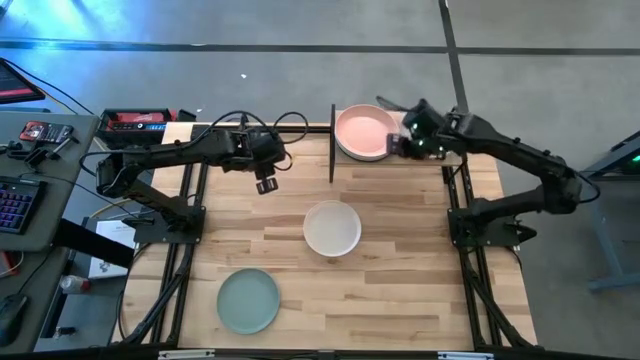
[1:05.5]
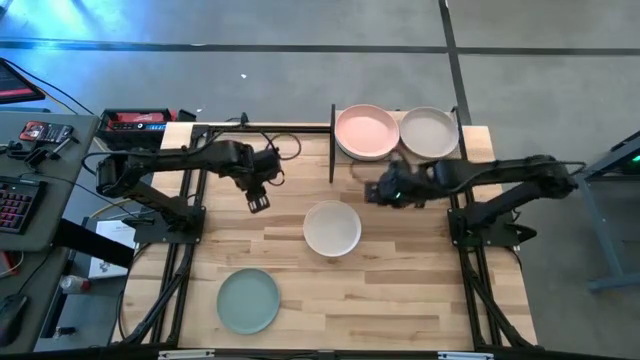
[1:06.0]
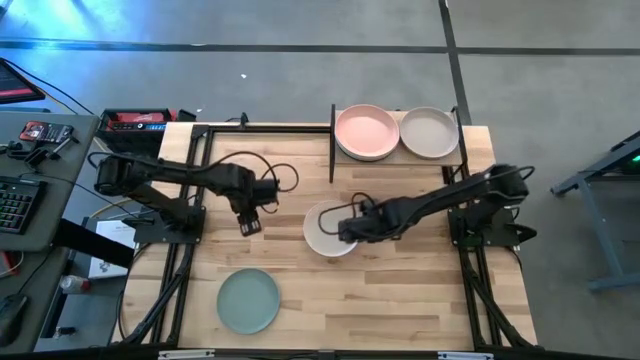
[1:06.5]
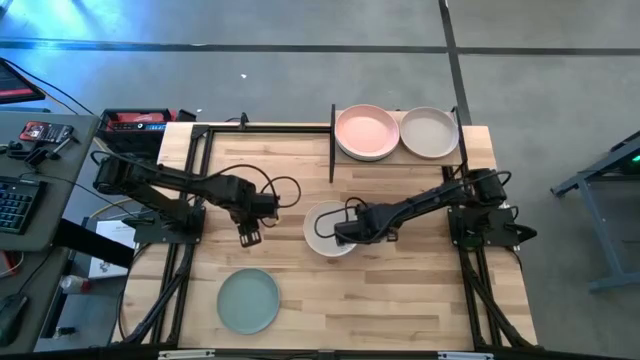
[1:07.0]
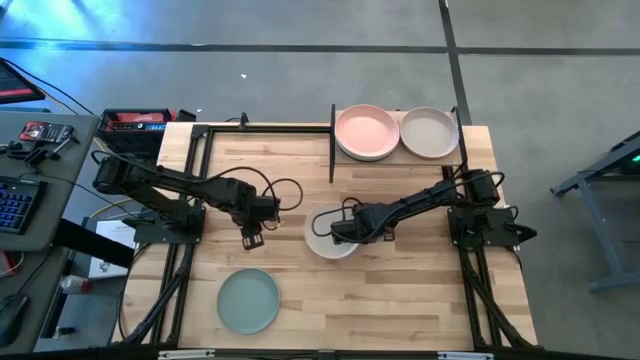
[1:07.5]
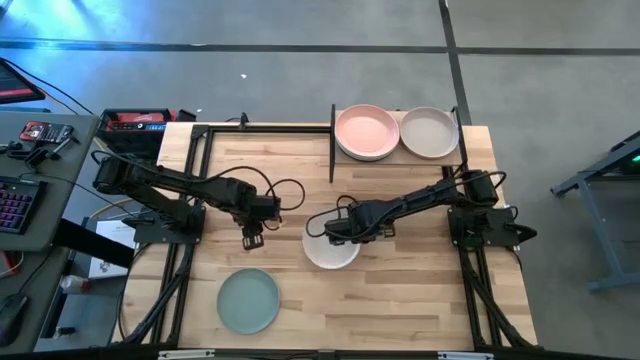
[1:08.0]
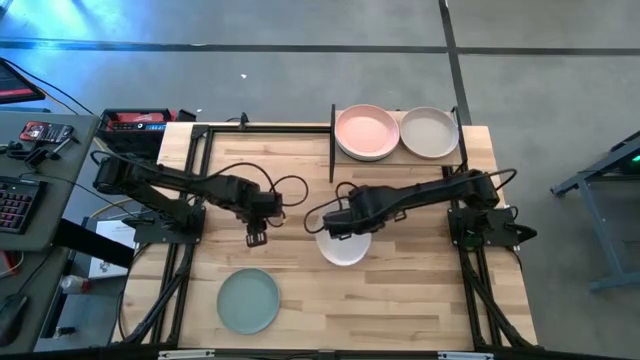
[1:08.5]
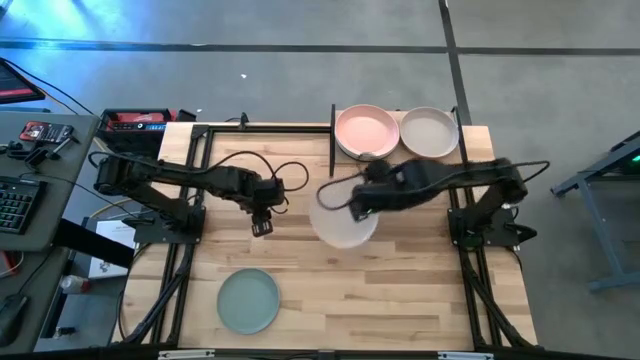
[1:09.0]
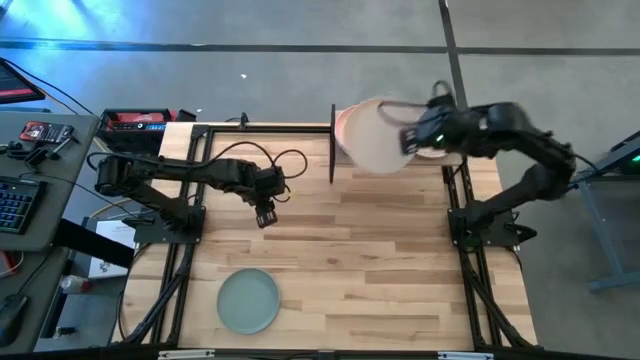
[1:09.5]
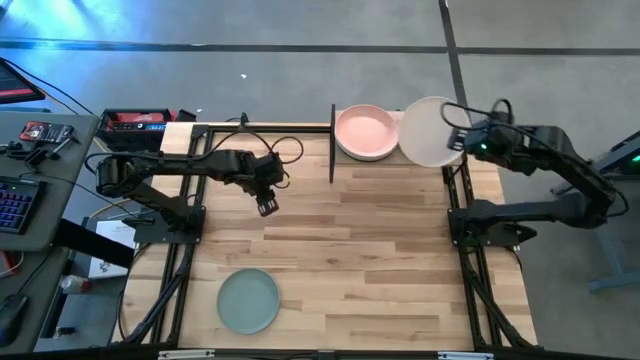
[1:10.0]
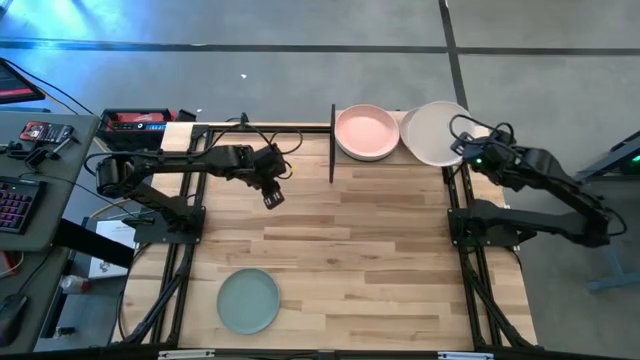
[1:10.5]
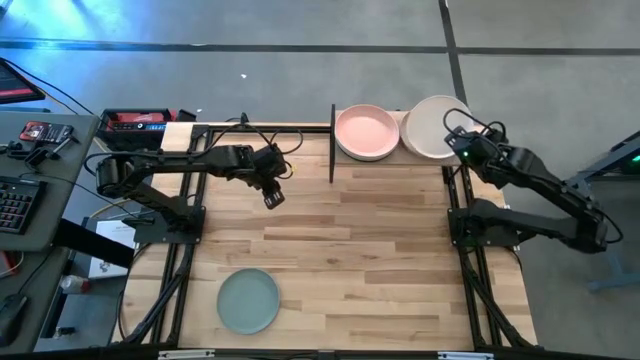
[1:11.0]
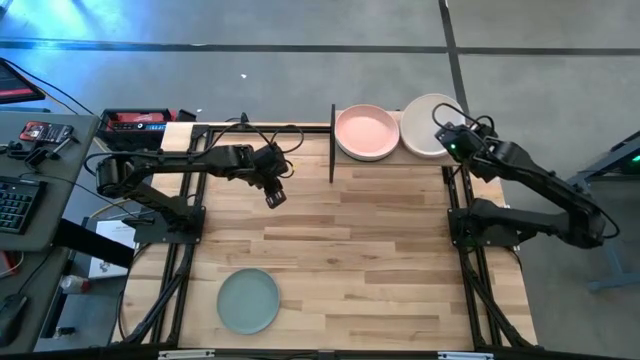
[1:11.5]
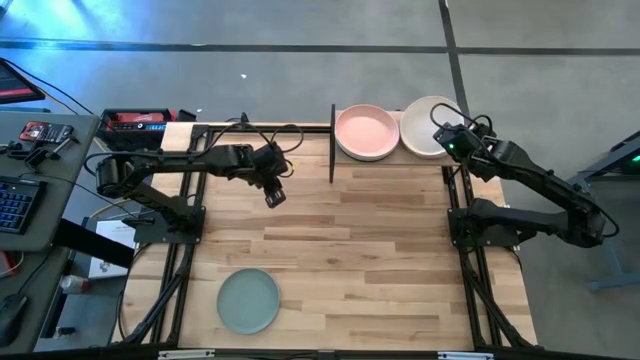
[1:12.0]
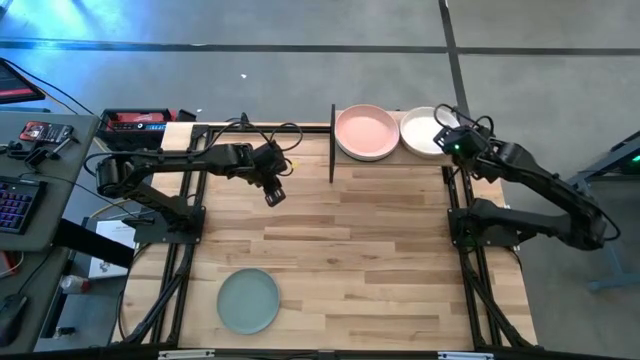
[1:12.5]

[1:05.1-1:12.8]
Task: Place and stack plates onto a shelf
Stack the white plate on top of the gray plate on the shelf

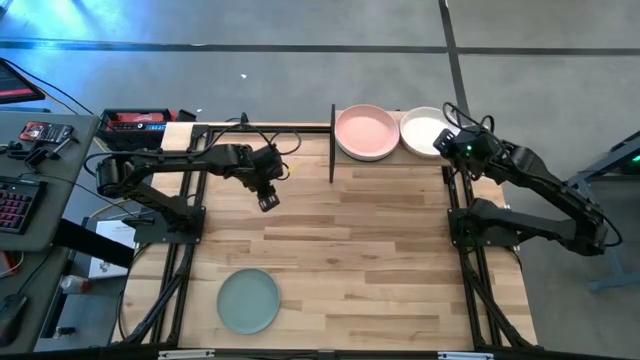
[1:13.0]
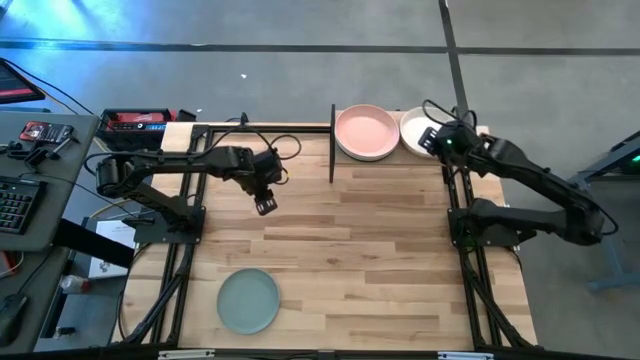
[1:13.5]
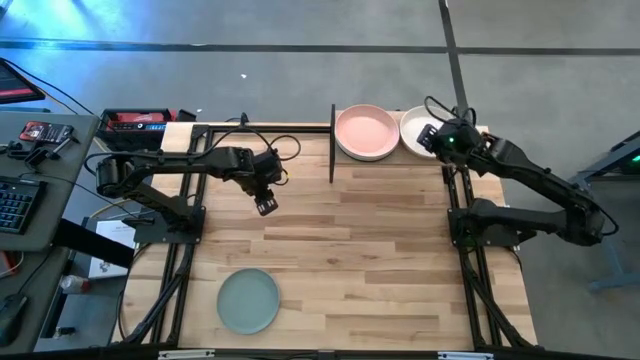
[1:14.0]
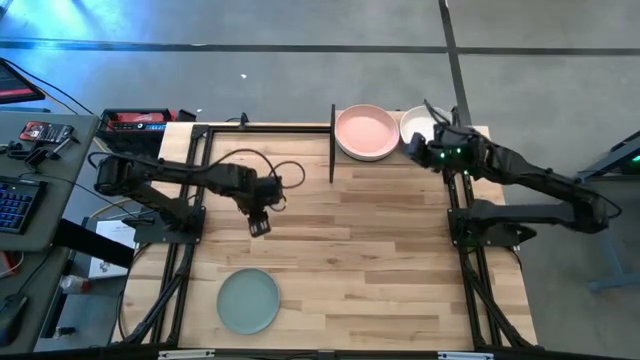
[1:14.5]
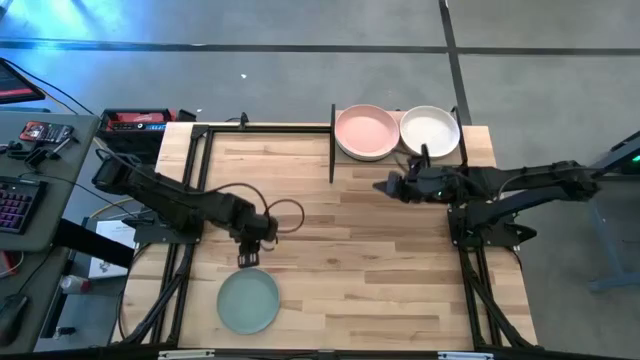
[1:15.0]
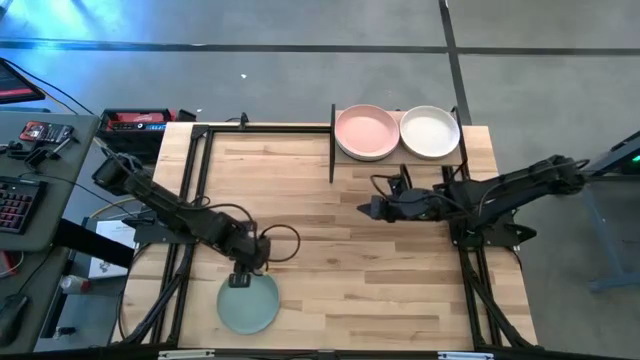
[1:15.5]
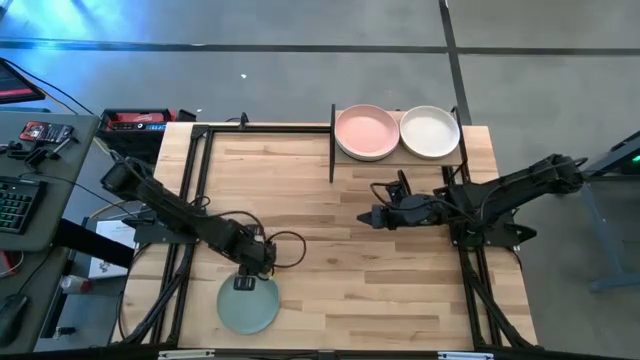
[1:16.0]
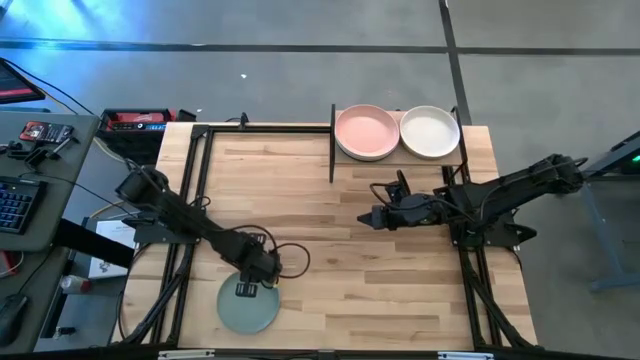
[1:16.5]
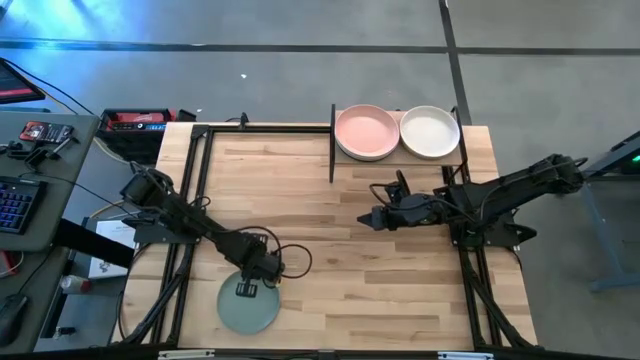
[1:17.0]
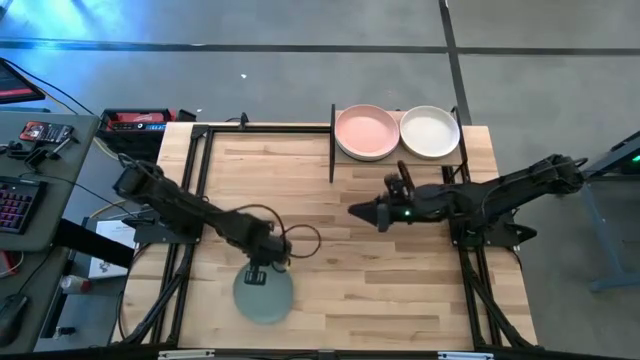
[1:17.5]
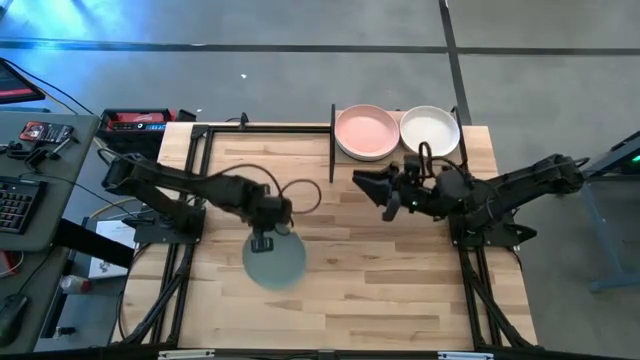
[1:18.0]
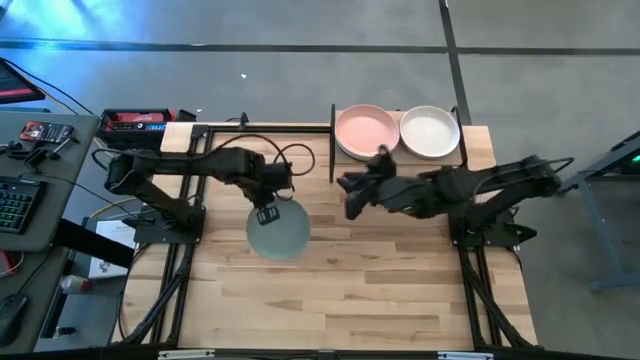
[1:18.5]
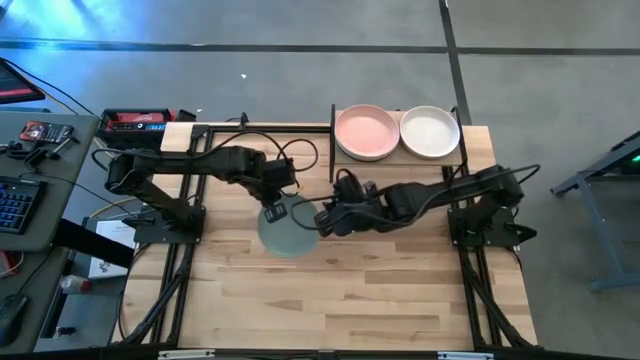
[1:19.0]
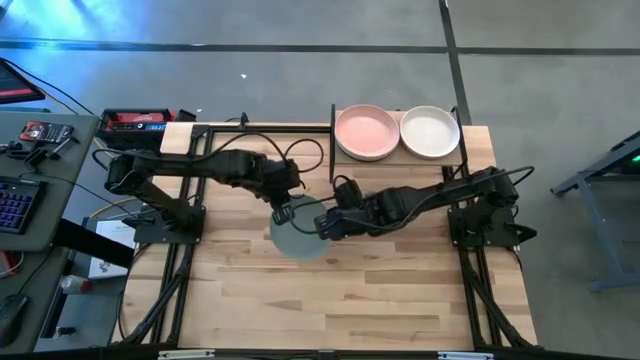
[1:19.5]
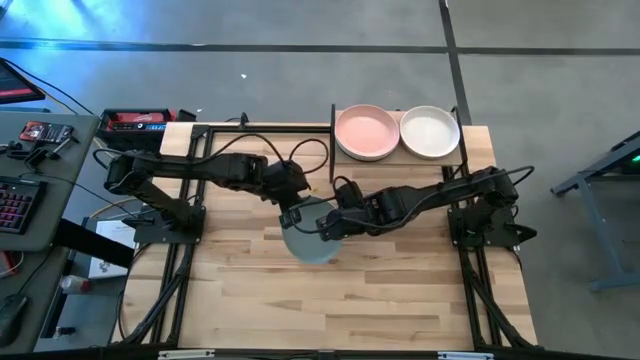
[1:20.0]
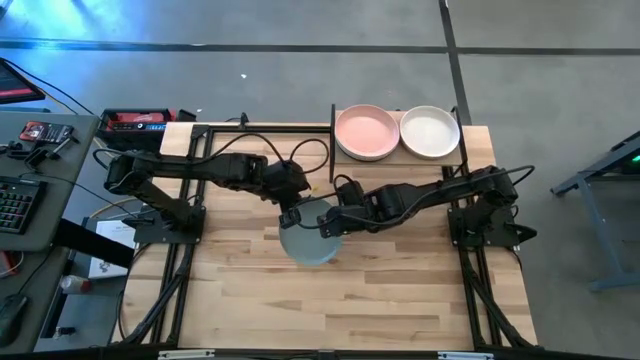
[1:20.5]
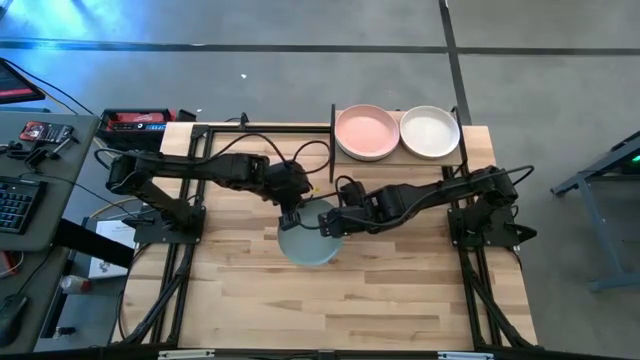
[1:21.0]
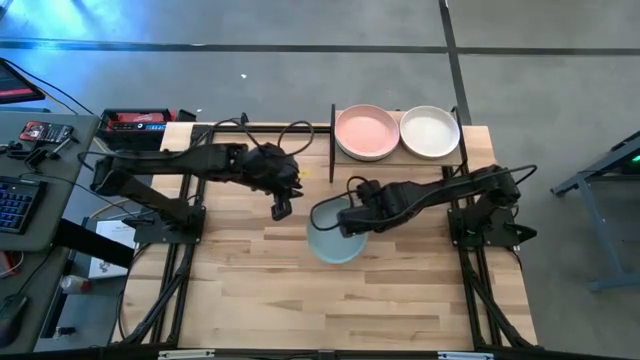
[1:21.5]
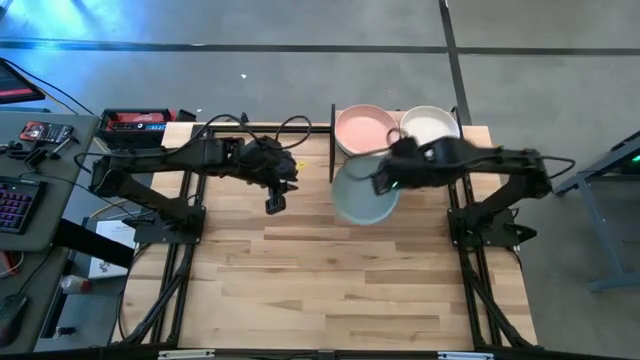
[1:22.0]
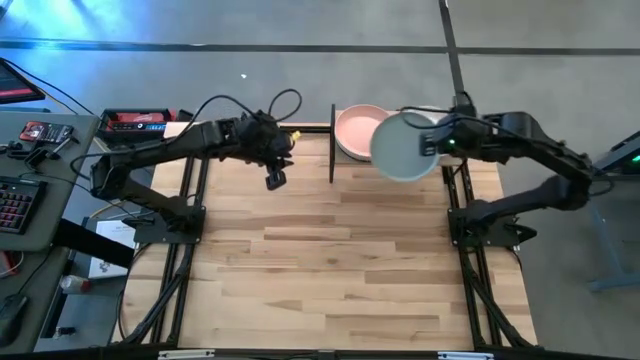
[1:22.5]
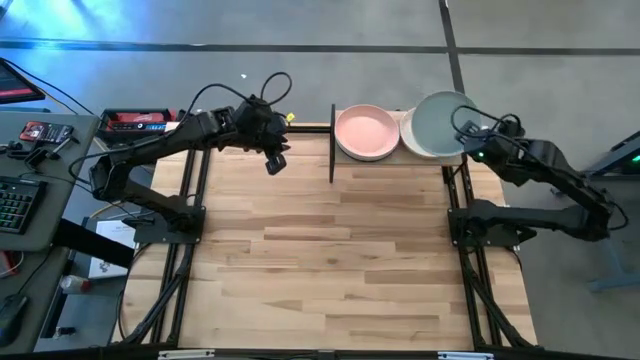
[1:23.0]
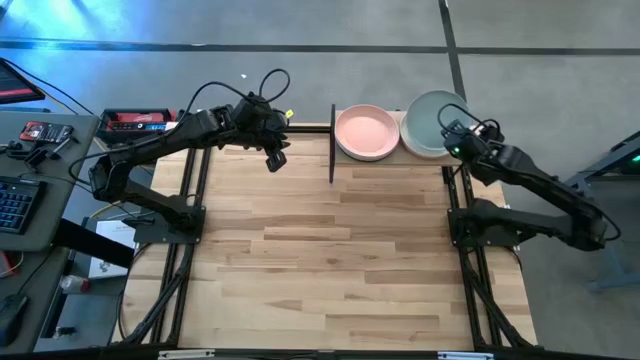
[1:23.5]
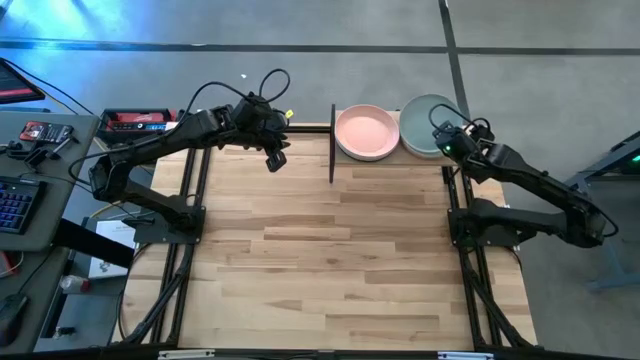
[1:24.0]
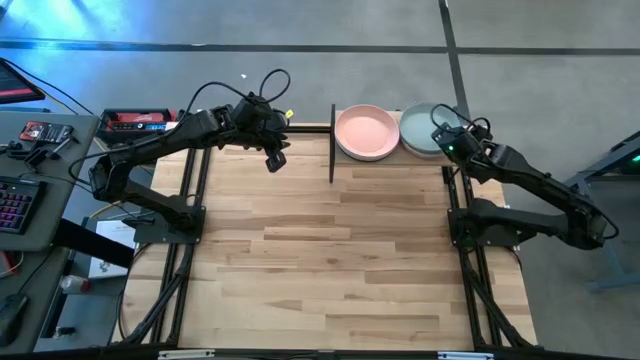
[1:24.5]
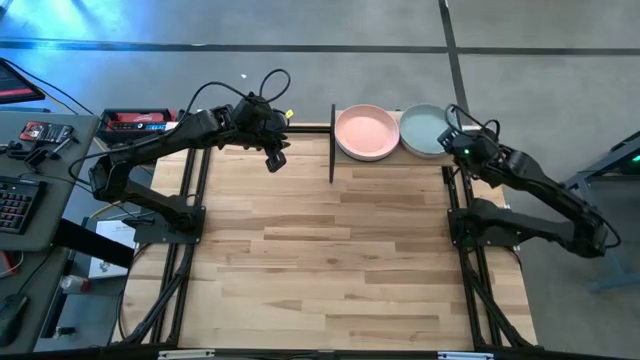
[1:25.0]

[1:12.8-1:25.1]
Stack the light blue plate on top of the white plate on the shelf

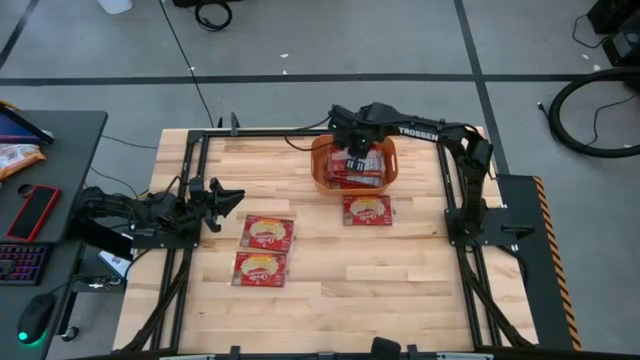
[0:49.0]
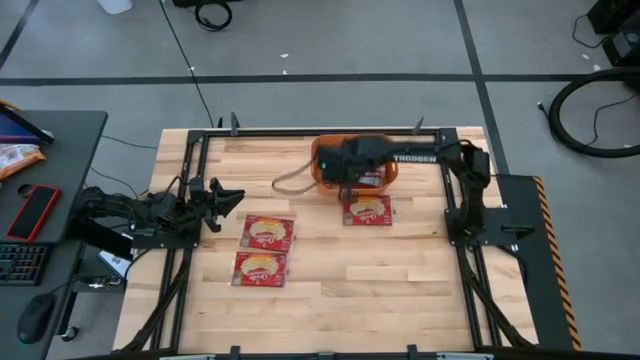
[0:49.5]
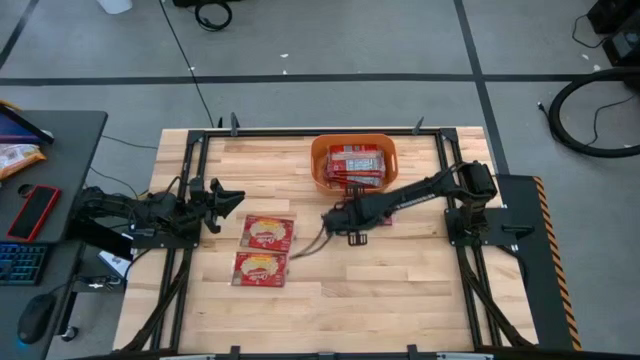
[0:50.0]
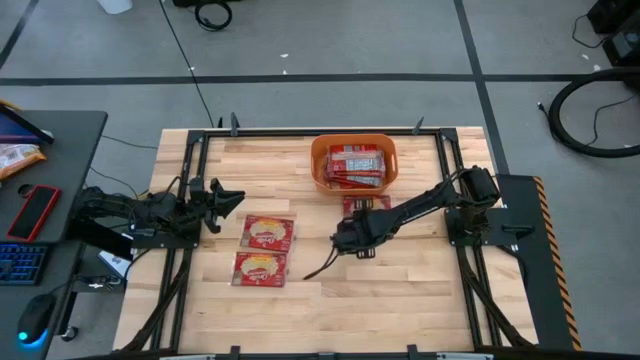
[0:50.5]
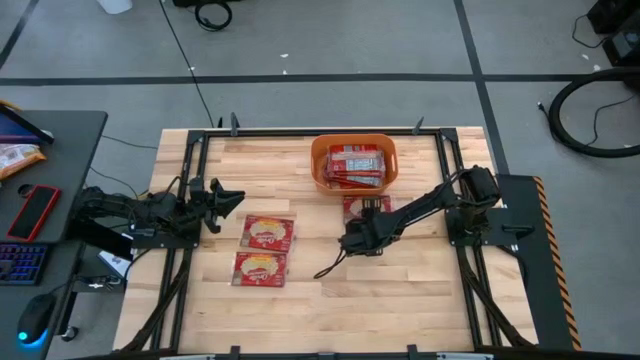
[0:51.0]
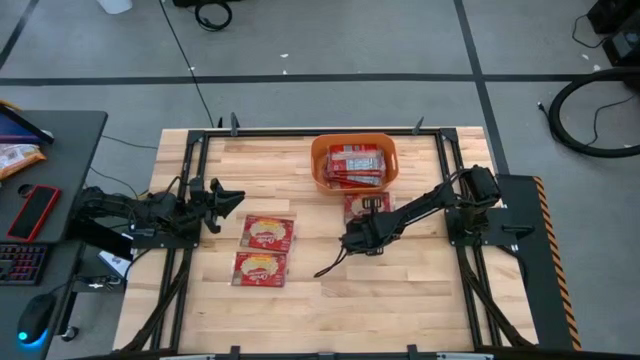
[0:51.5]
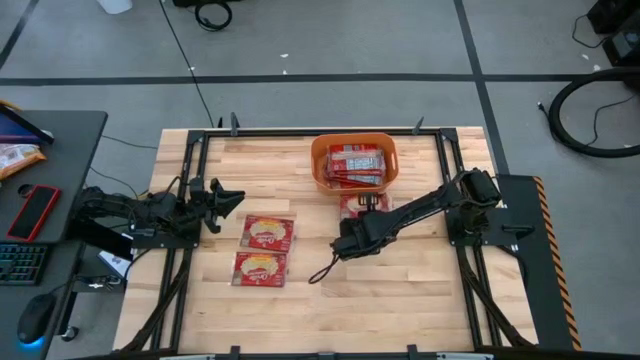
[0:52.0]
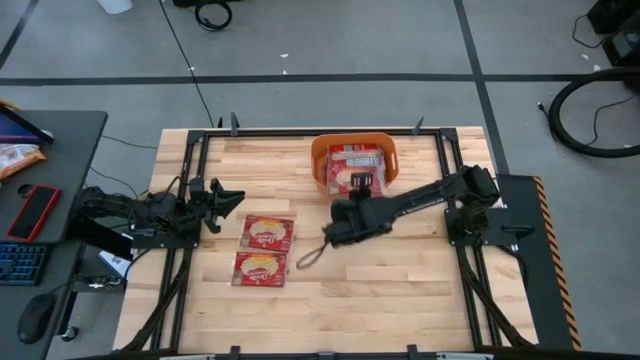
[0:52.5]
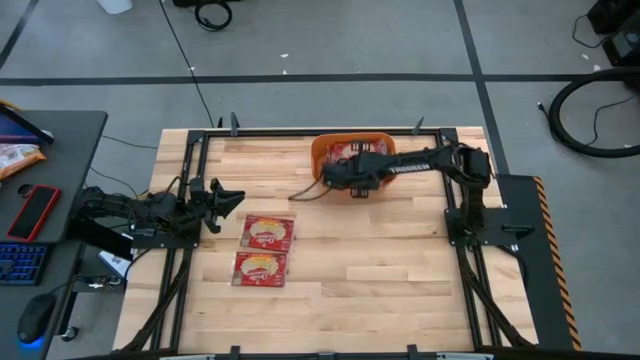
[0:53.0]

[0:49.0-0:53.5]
Task: Sort popcorn bags into baskets
Stack the popcorn bag on top of the other popcorn bag into the orange container
